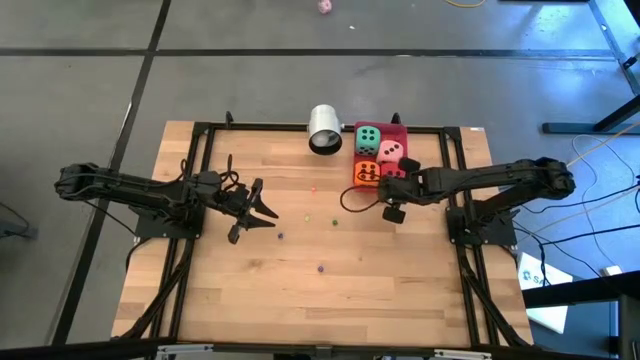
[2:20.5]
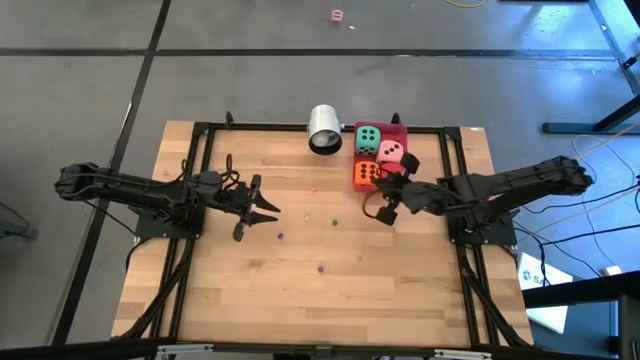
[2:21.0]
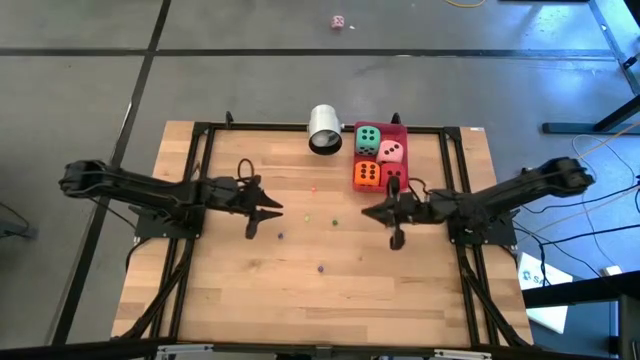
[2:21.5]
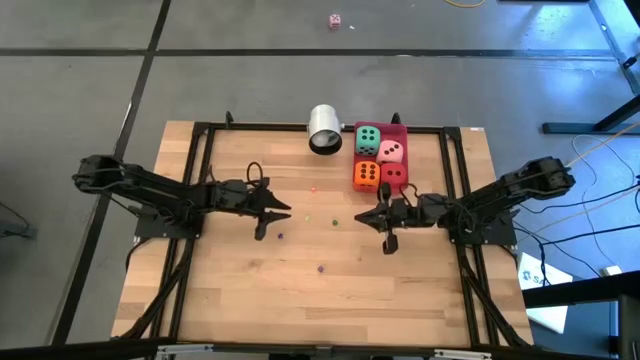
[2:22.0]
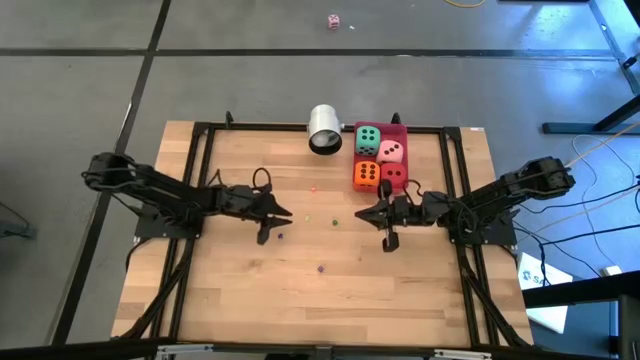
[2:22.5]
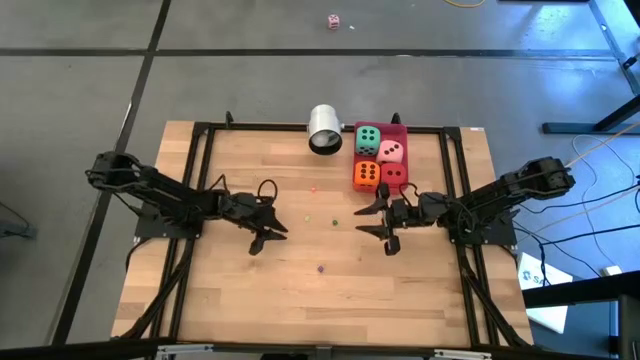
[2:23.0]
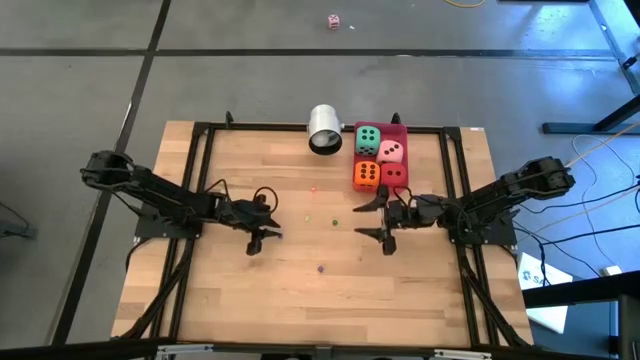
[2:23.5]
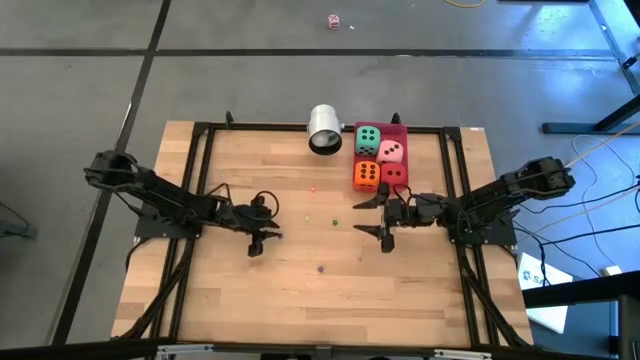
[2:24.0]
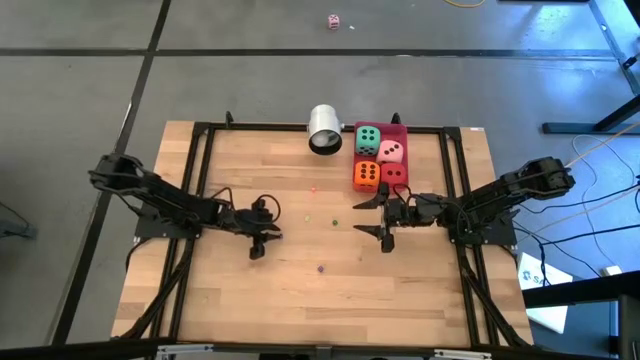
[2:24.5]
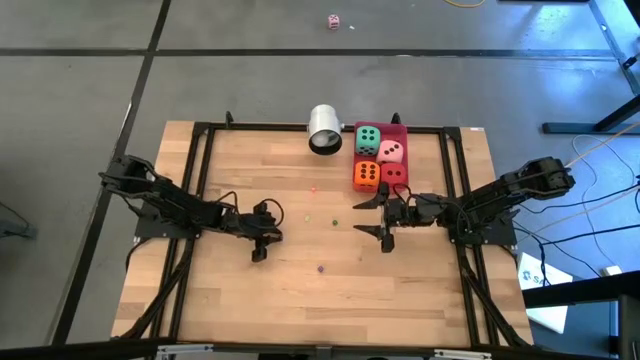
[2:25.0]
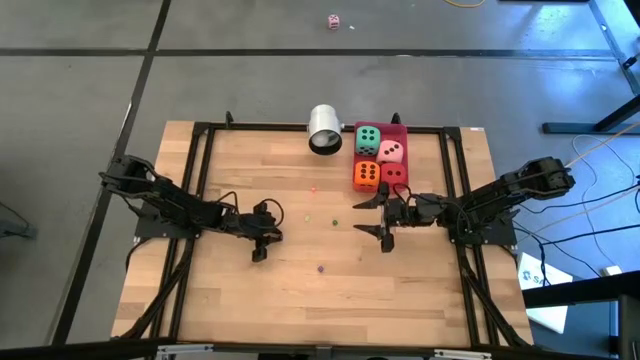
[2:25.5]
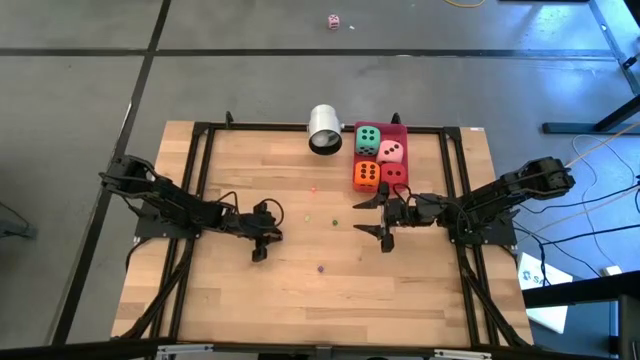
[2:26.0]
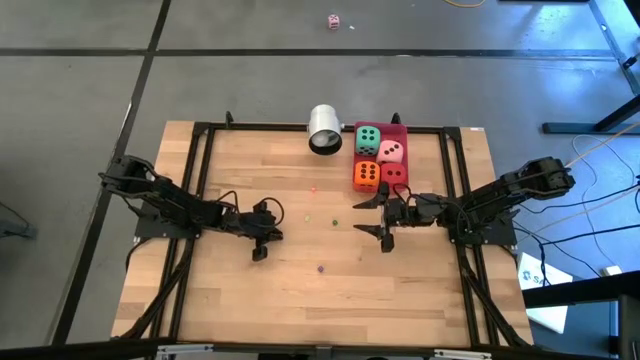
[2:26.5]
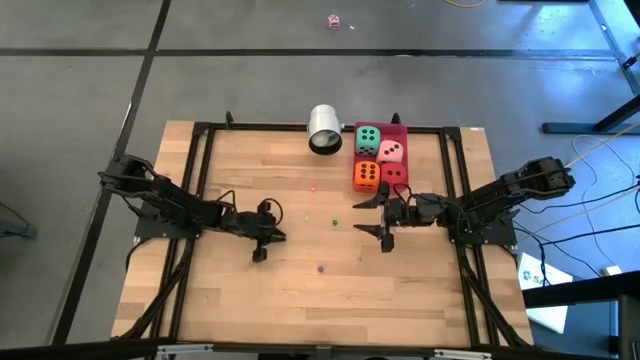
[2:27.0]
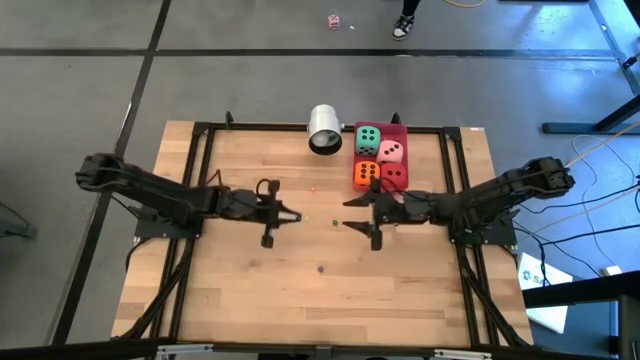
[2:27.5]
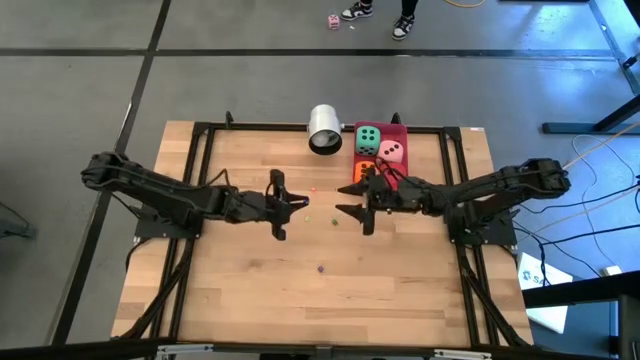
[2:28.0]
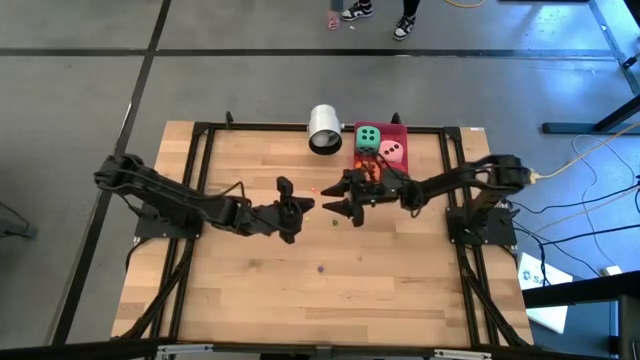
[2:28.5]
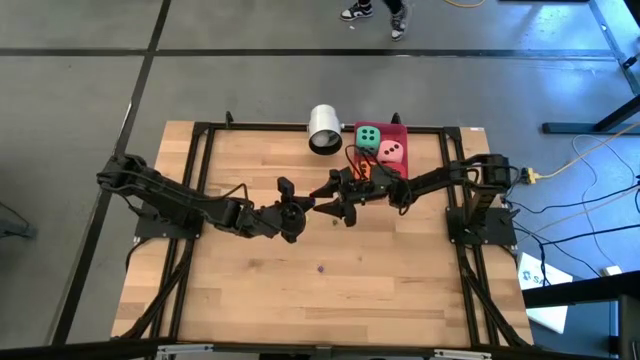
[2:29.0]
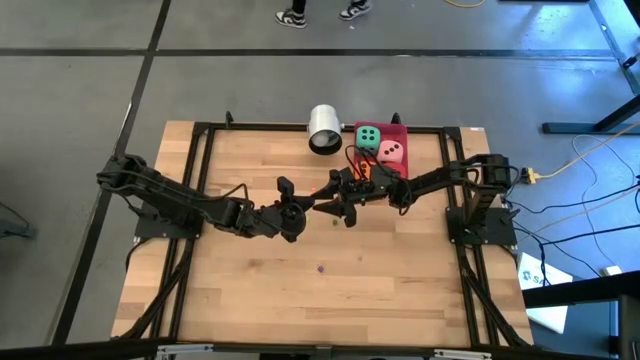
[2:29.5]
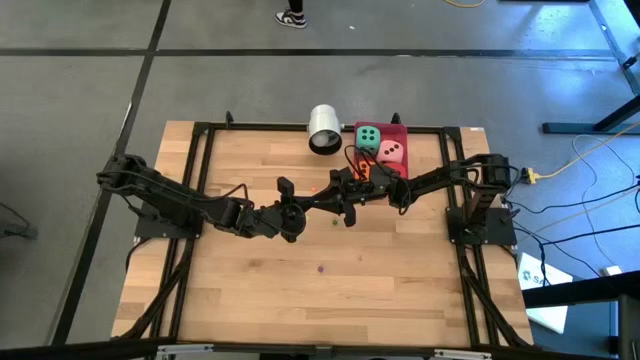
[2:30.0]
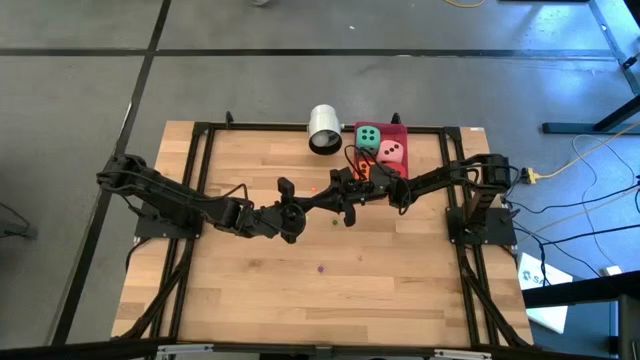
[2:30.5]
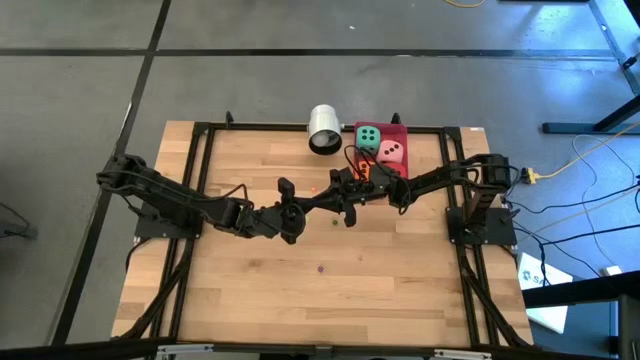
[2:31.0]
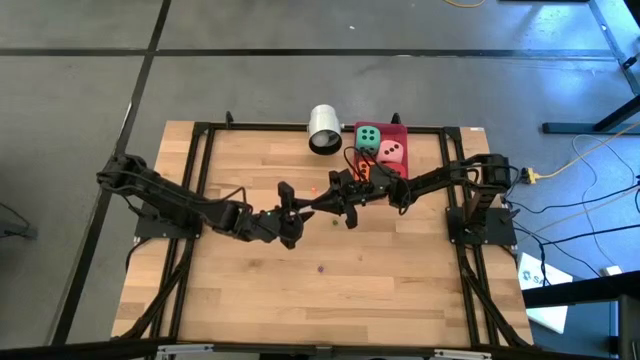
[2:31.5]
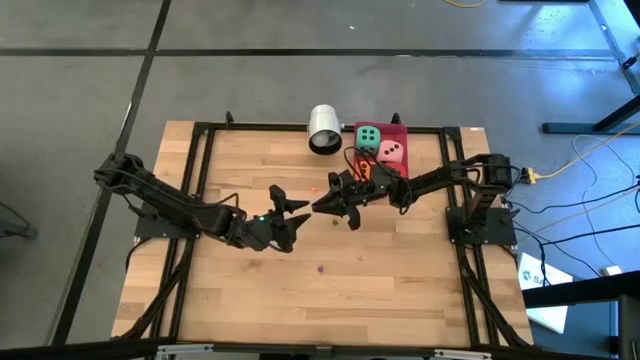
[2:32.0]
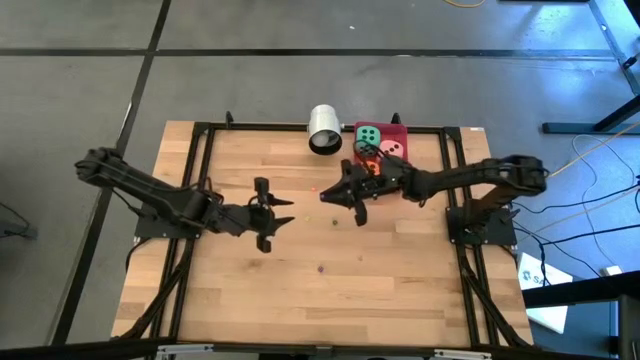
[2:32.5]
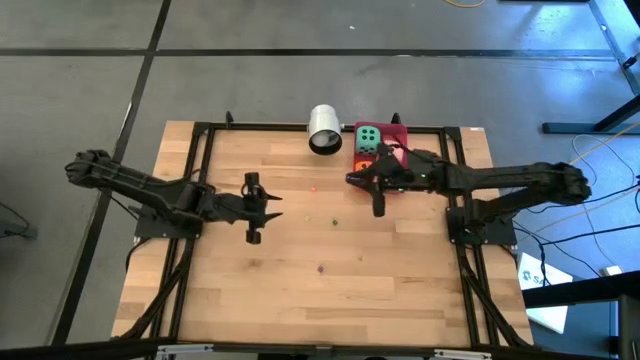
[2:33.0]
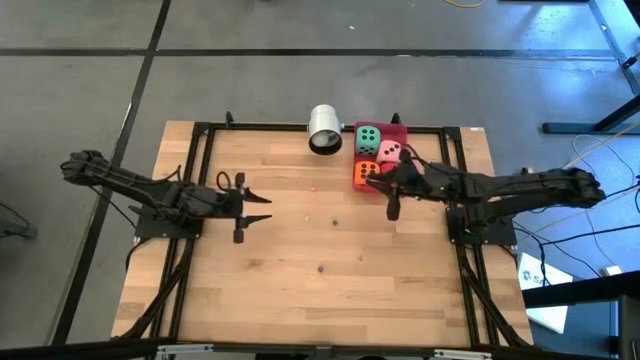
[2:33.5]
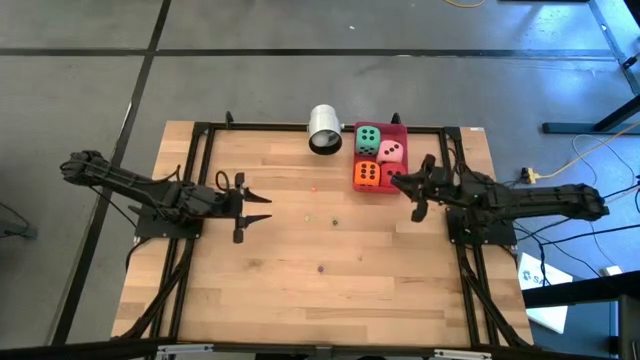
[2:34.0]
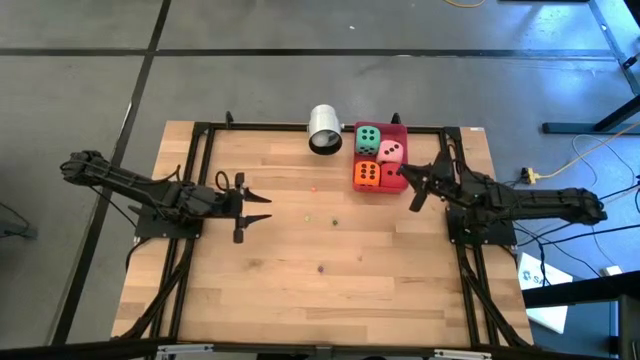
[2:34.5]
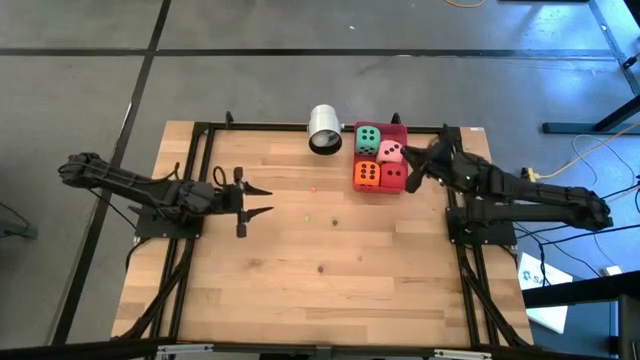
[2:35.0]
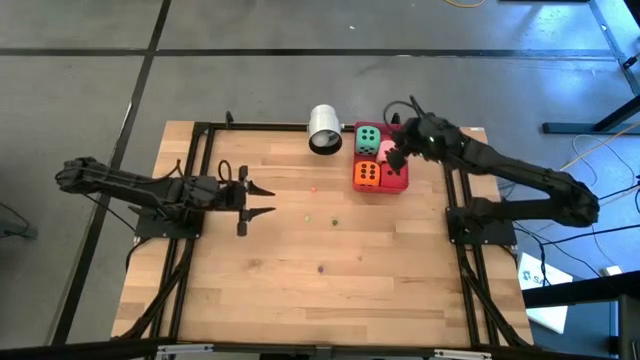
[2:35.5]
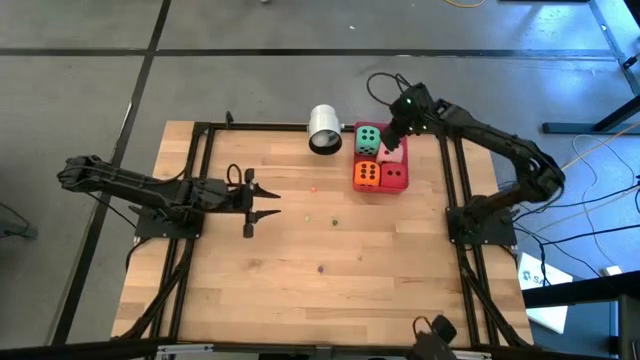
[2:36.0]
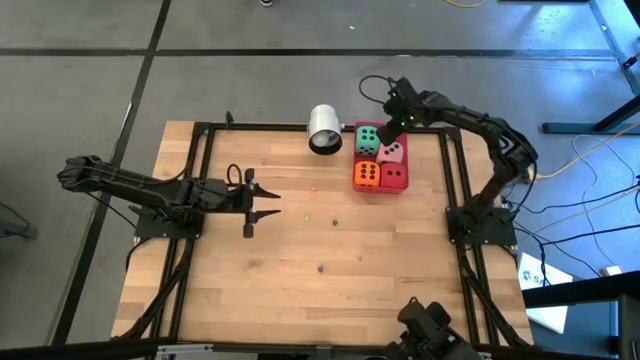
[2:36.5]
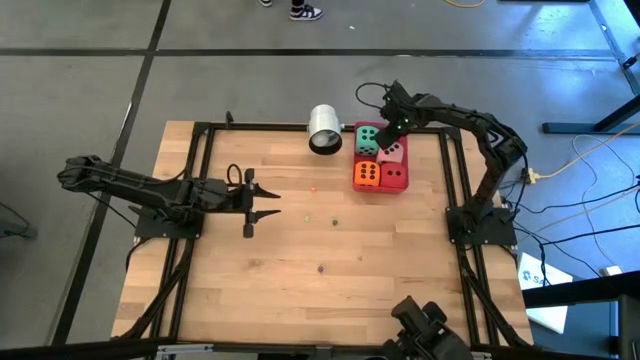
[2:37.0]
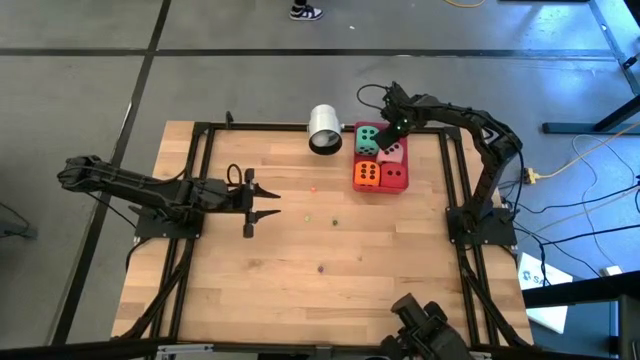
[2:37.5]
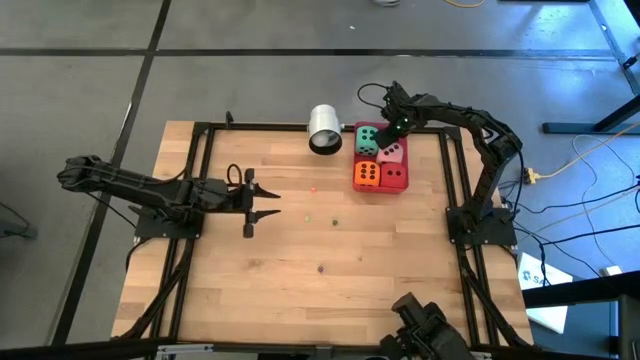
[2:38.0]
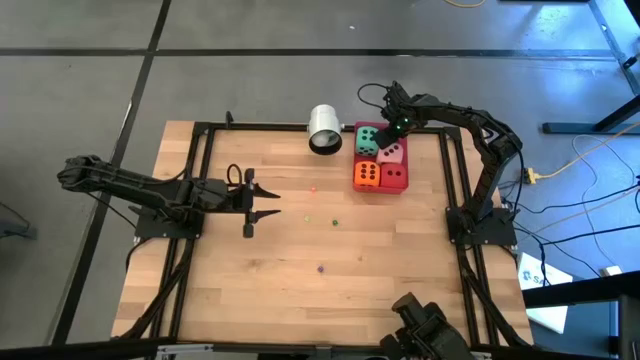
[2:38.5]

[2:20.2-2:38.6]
Task: Pick & Place Dice
Put the left small blue dice into the red bin

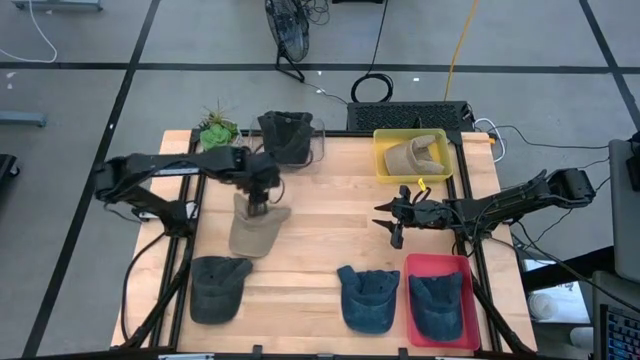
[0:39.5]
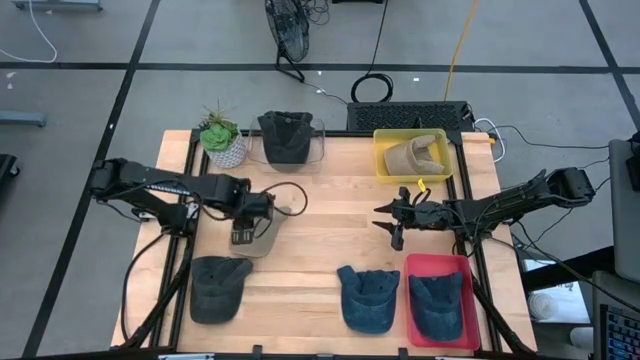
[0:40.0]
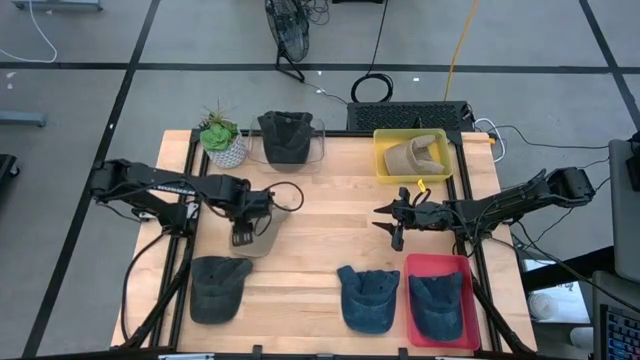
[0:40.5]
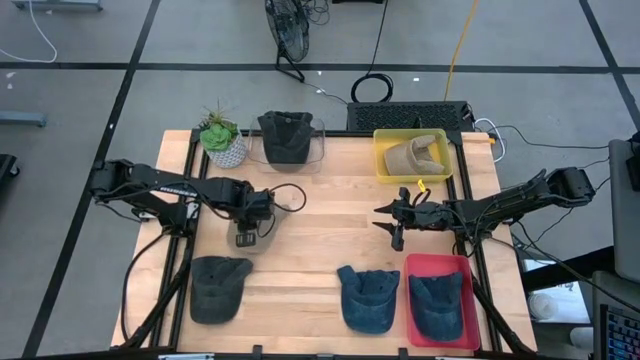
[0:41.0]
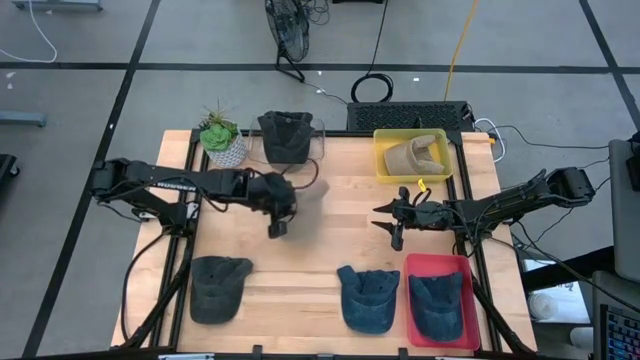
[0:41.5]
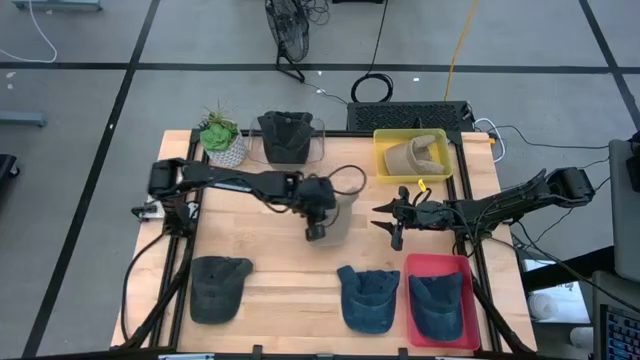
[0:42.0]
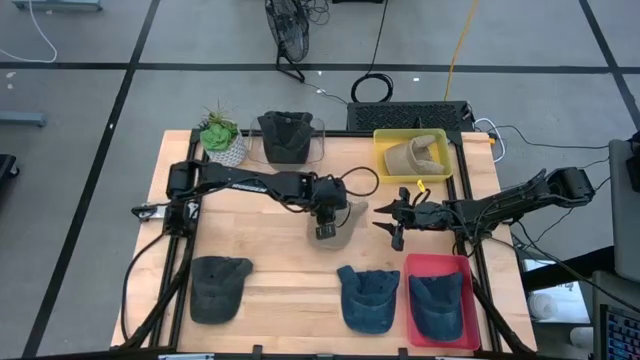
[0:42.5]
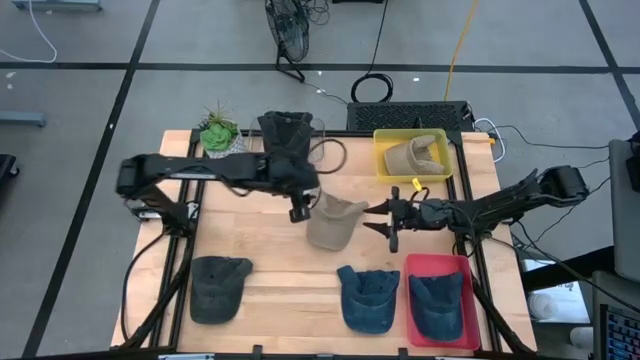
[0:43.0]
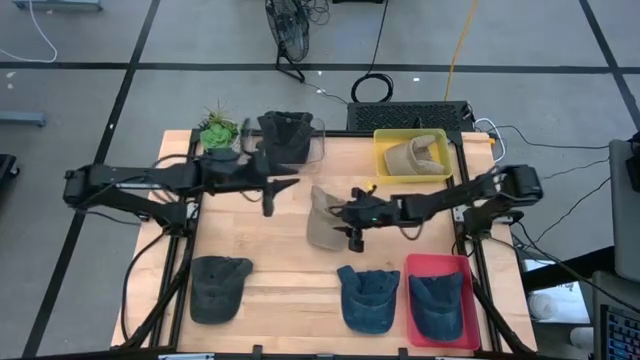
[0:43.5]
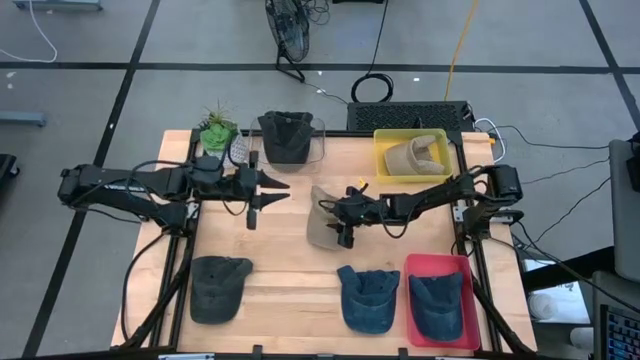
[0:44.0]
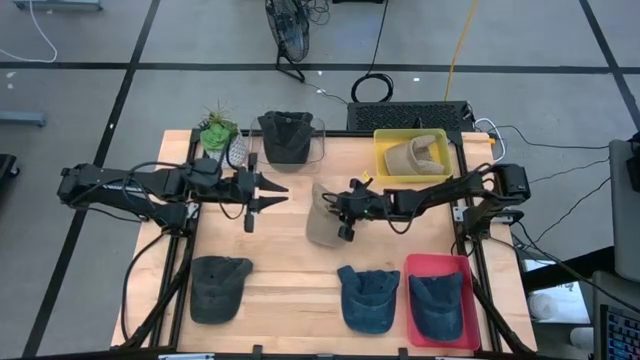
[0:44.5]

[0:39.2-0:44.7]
Task: Pick & Place hat
Put the brown cap into the yellow bin
